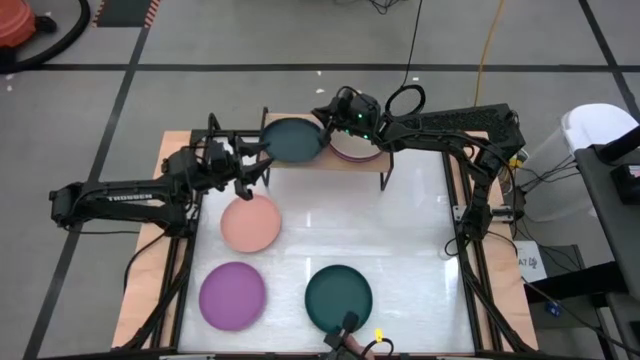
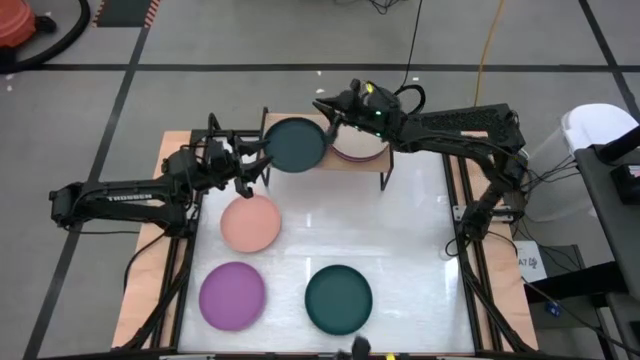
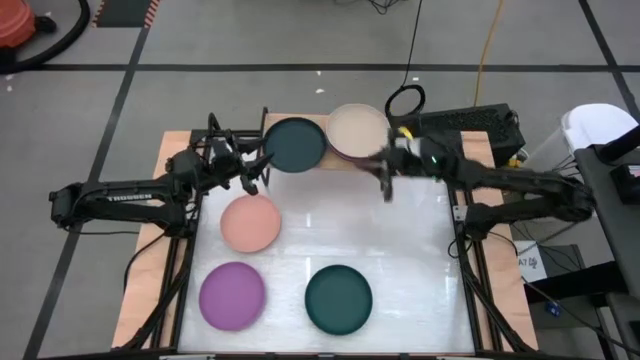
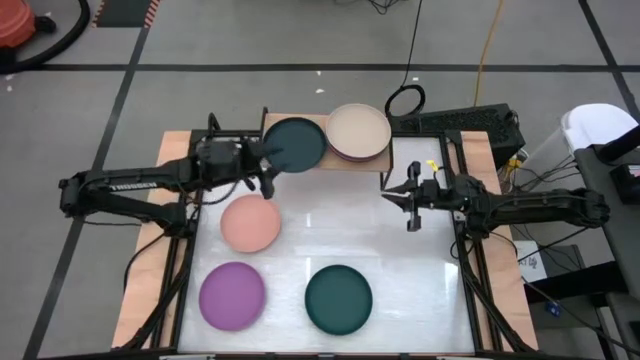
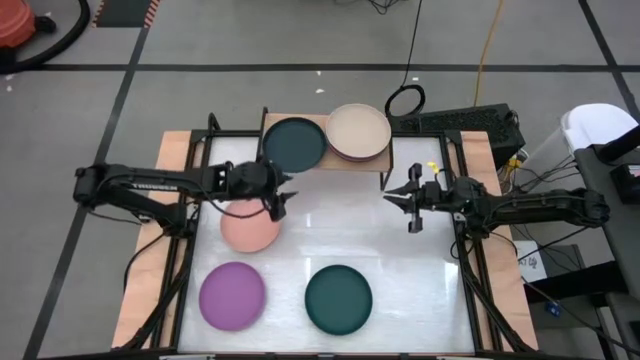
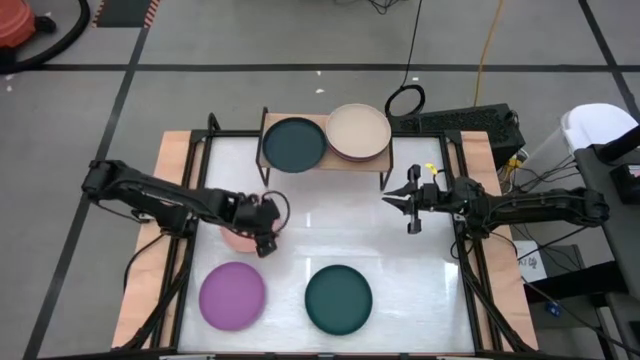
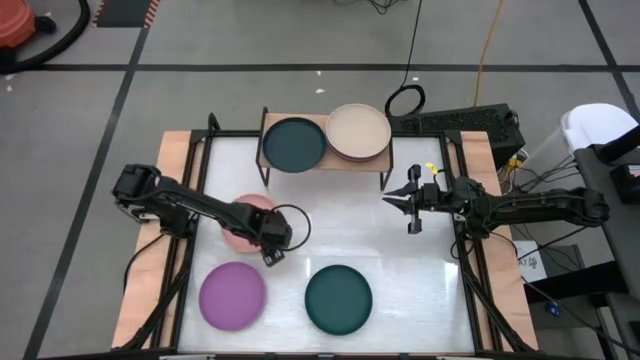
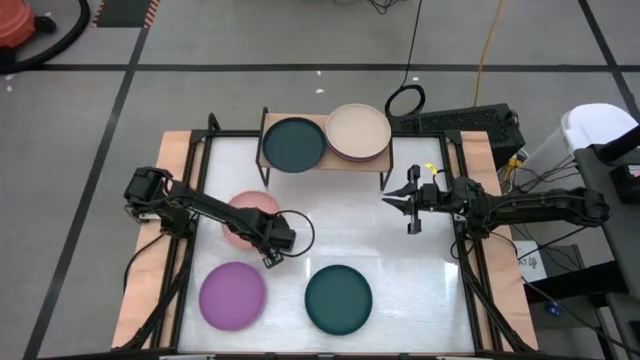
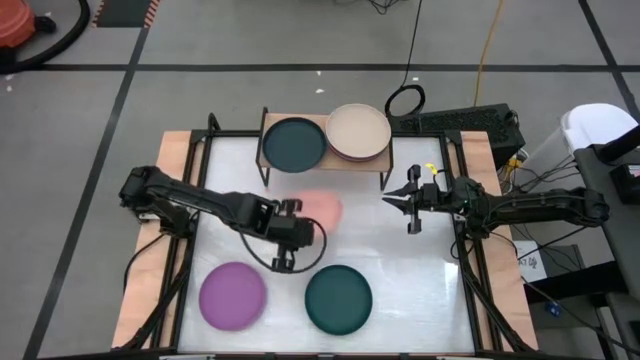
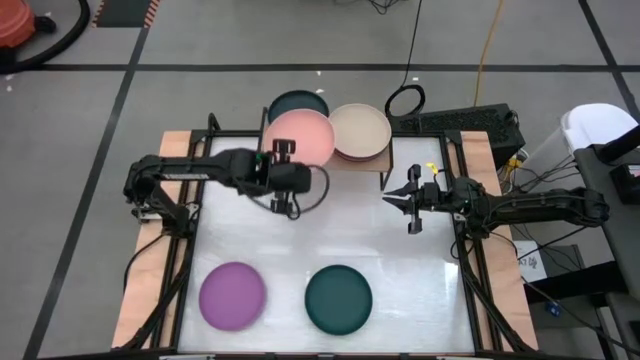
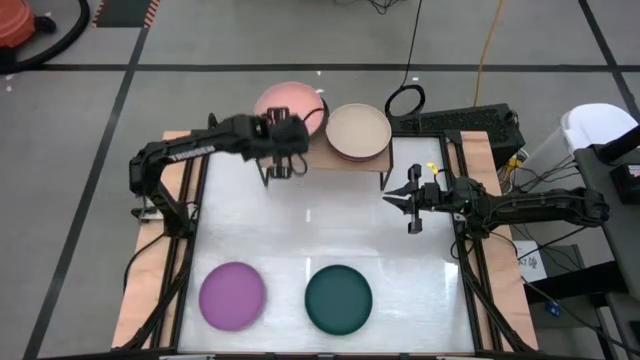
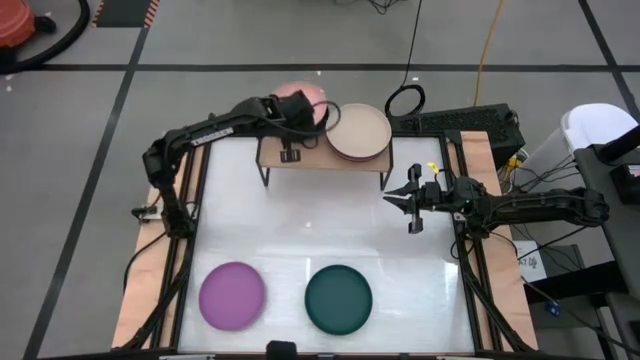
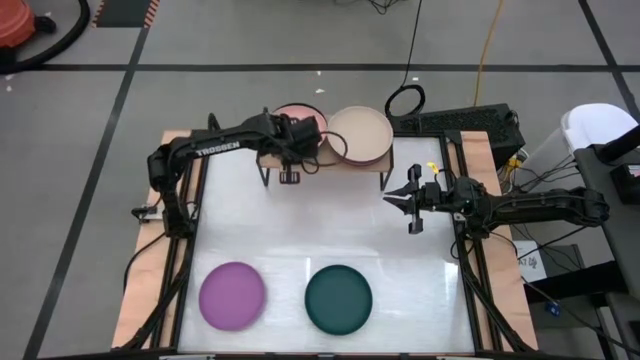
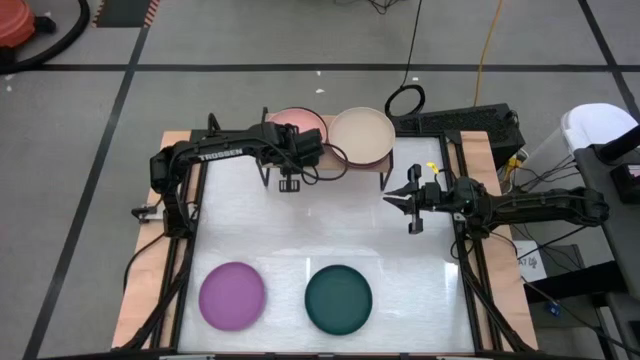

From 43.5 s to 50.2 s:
Task: Place and stack plates onto a shelf
Stack the light orange plate on top of the black plate on the shelf

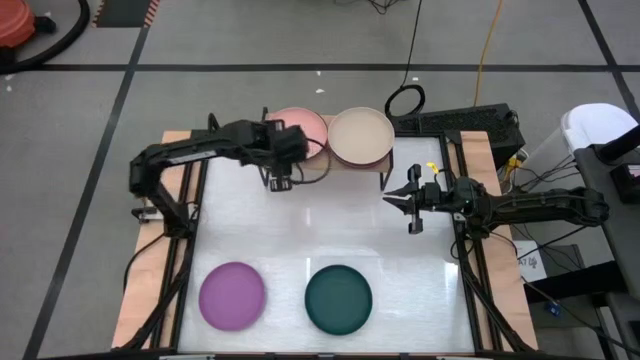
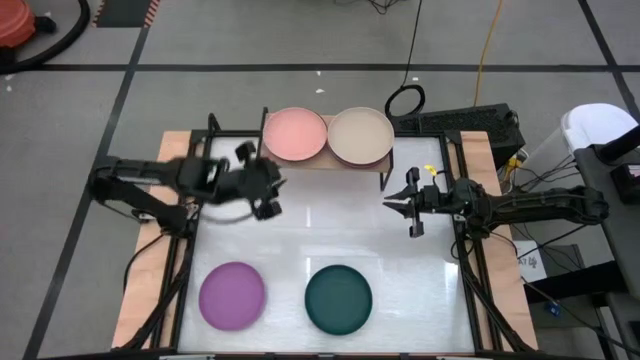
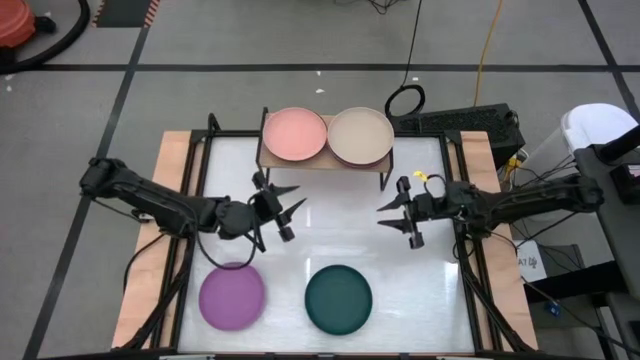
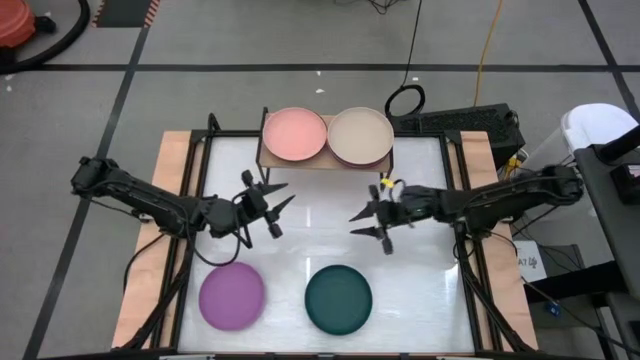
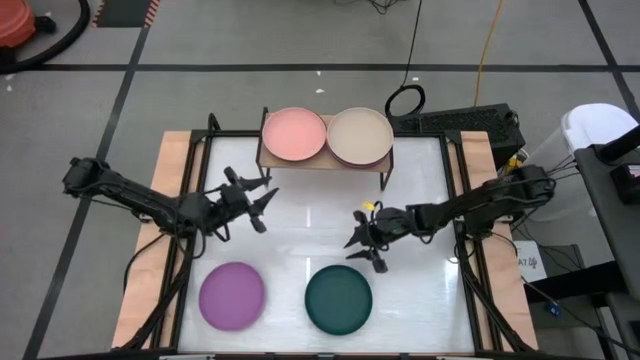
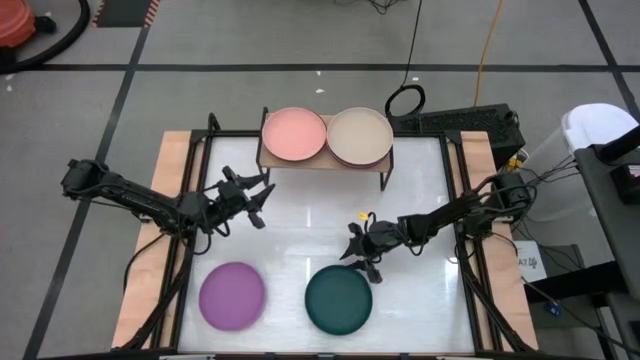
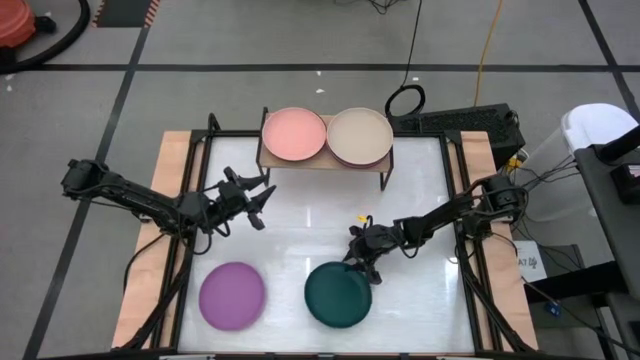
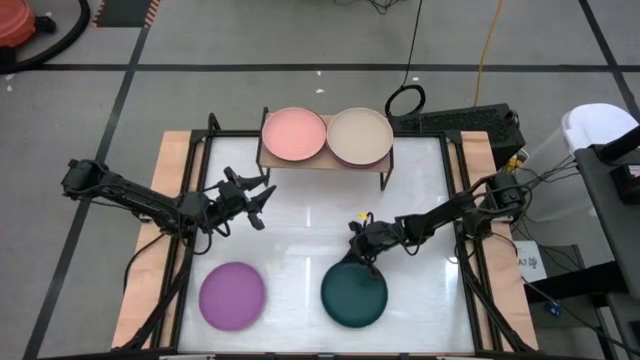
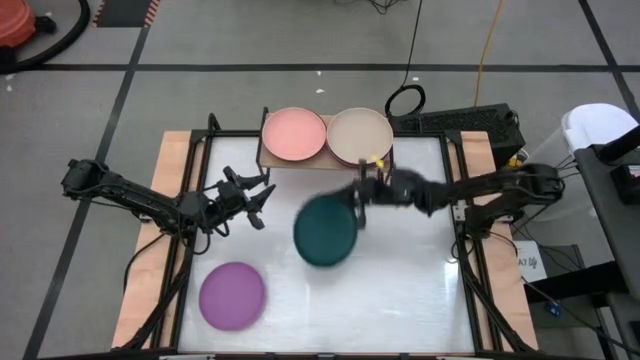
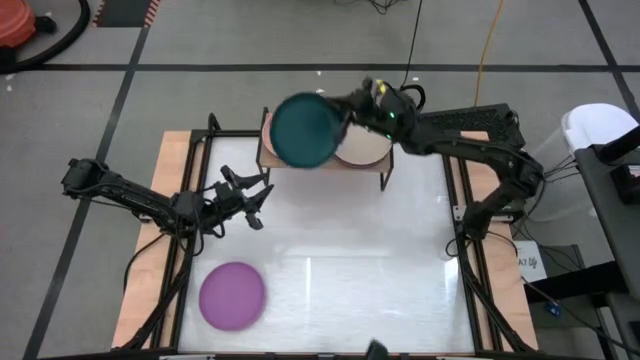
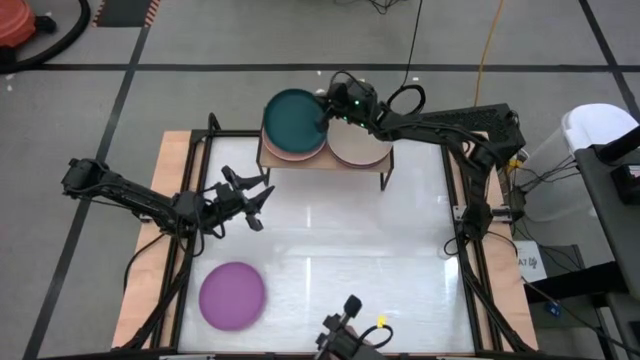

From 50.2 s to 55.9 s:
Stack the green plate on top of the light orange plate on the shelf

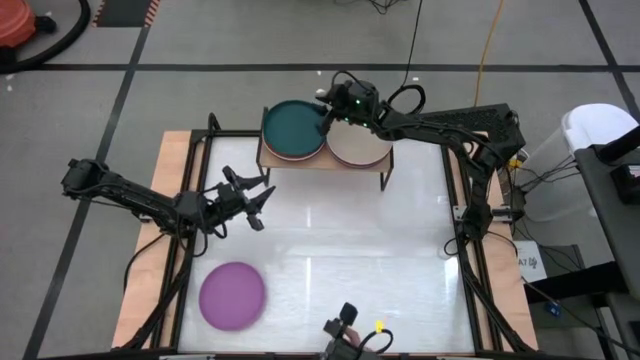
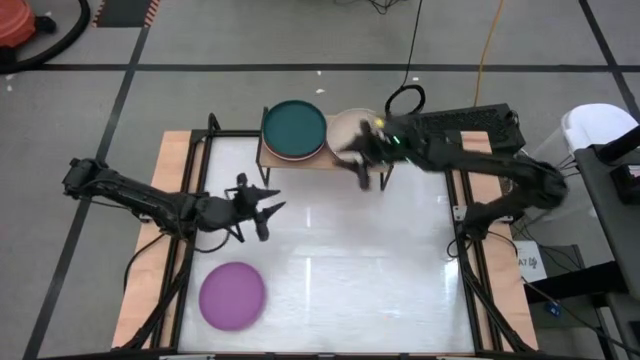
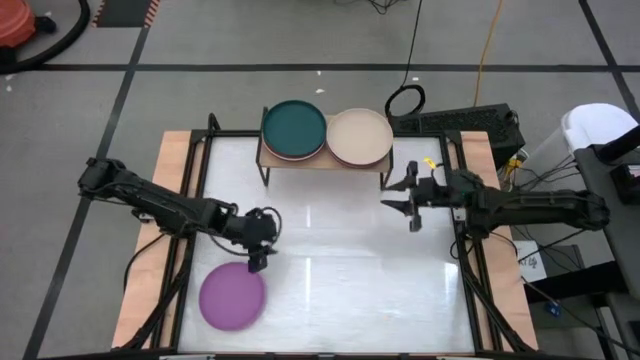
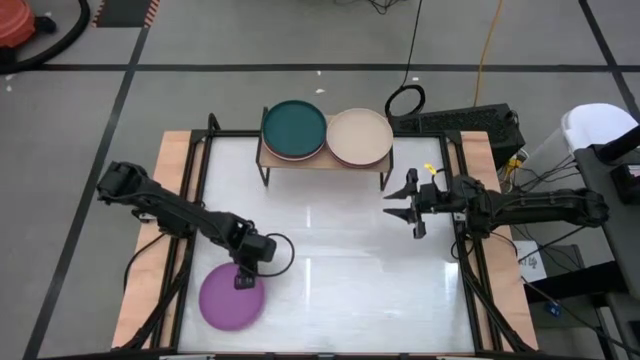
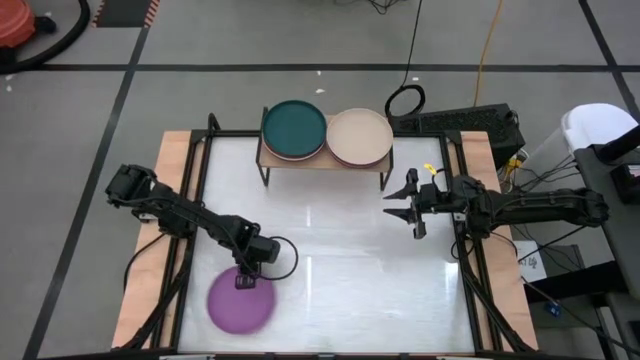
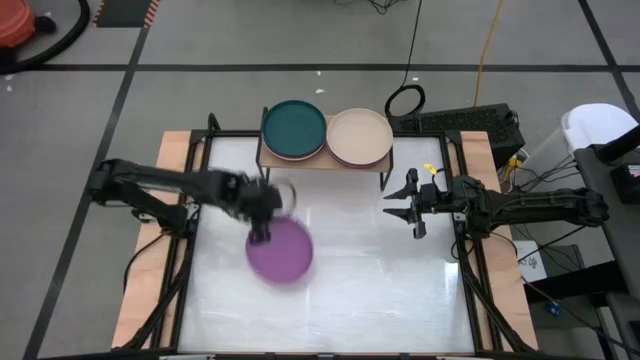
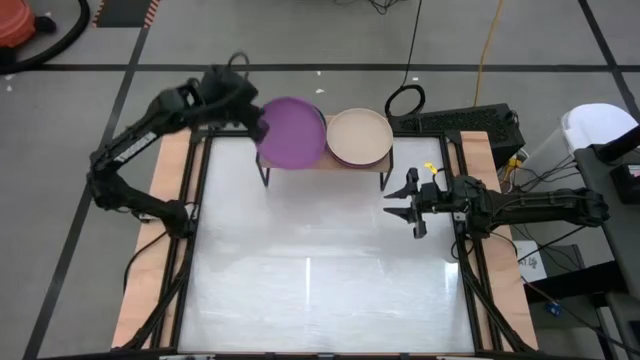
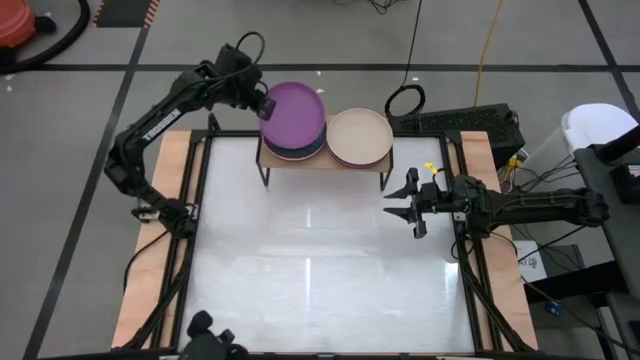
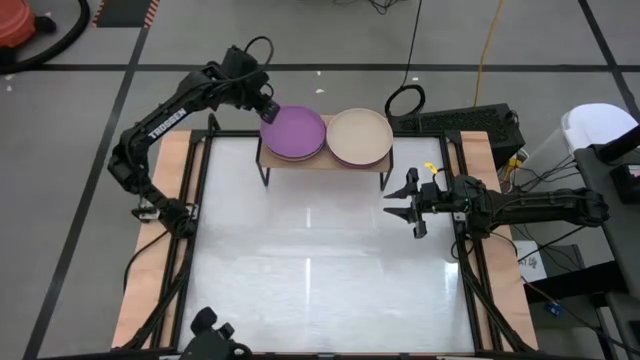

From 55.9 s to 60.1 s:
Stack the violet plate on top of the green plate on the shelf

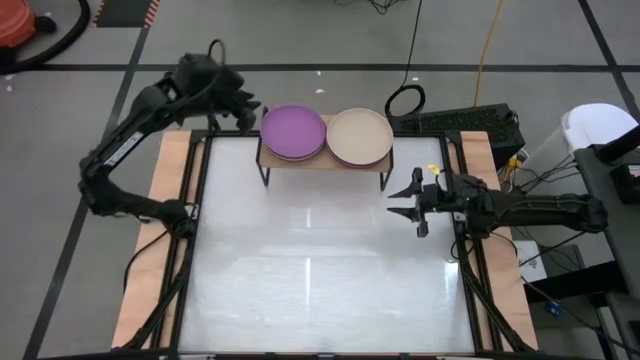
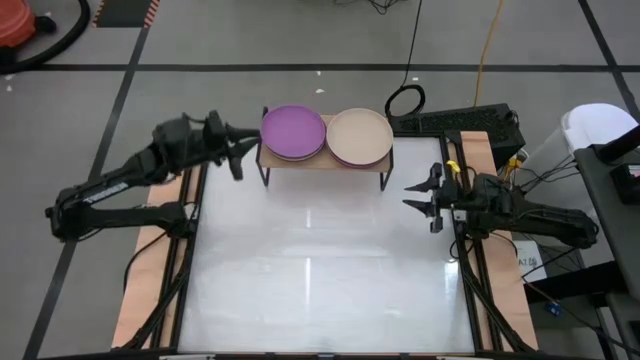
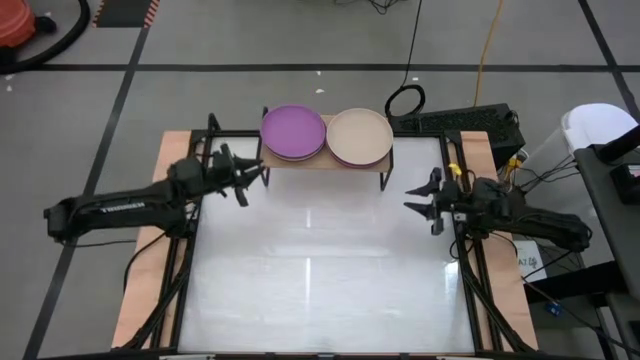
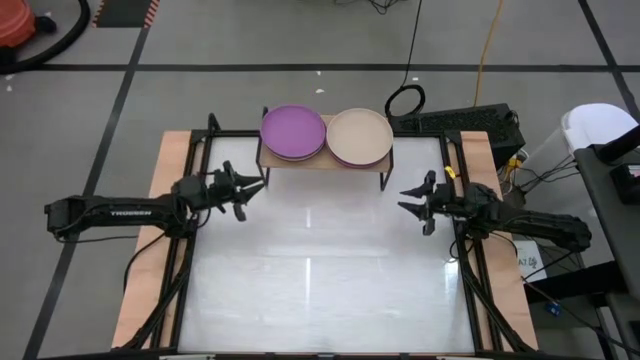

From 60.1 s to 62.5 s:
Return to Home Position

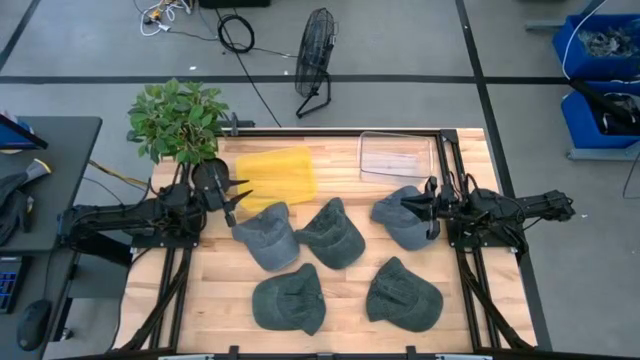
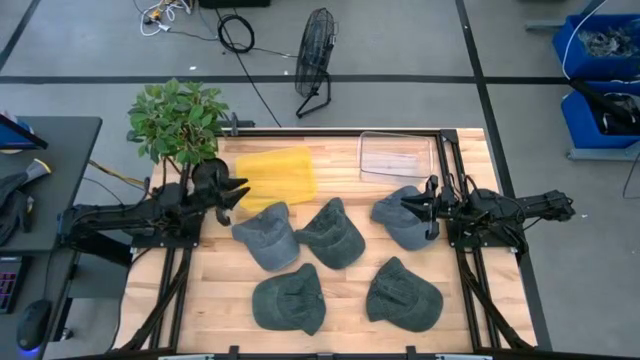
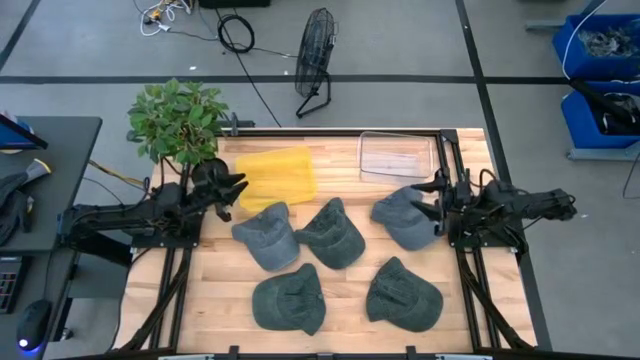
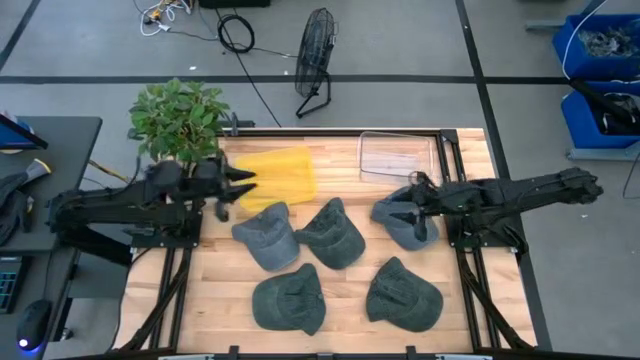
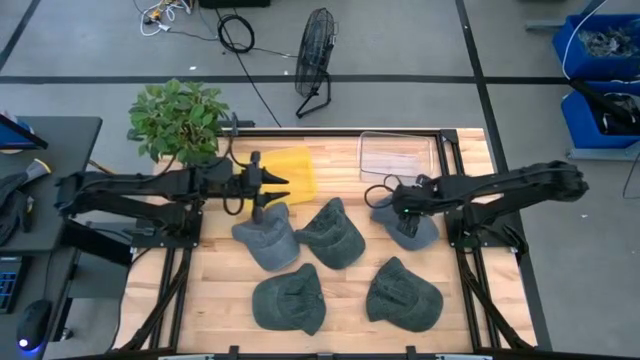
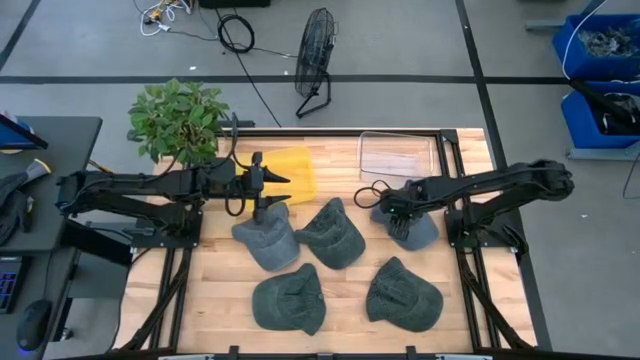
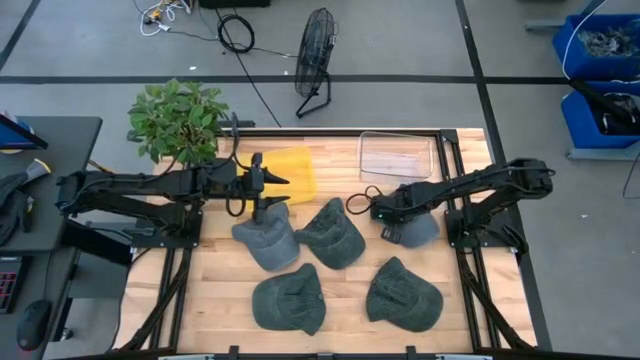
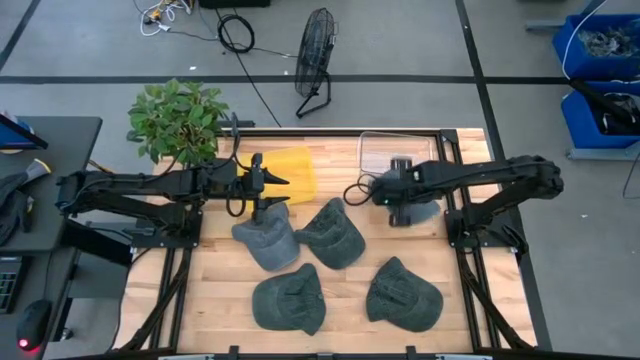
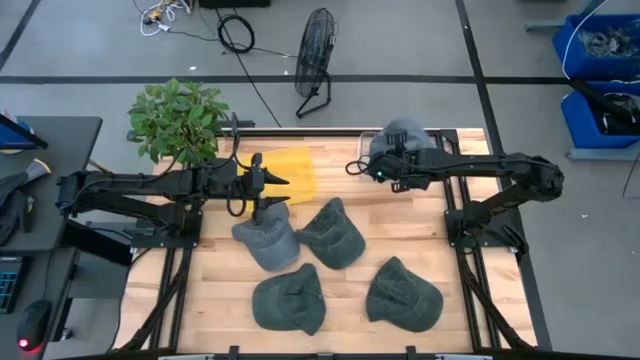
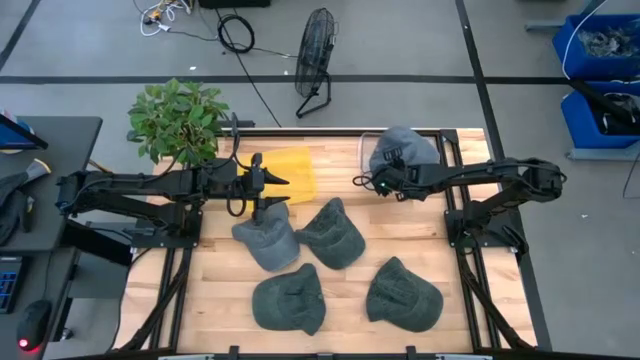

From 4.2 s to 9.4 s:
Task: Pick & Place hat
Put the right gray cap into the transparent bin
